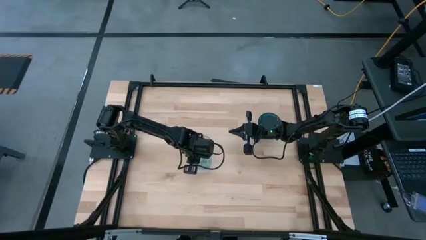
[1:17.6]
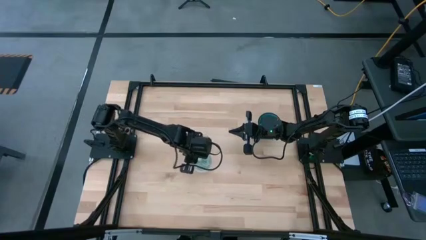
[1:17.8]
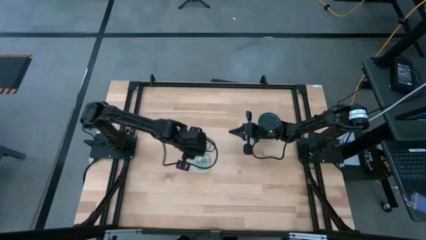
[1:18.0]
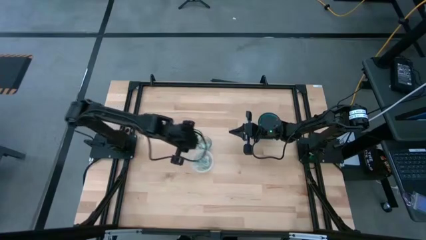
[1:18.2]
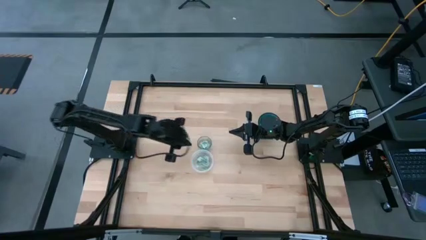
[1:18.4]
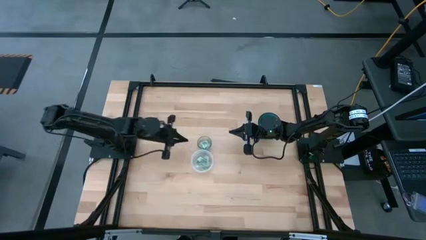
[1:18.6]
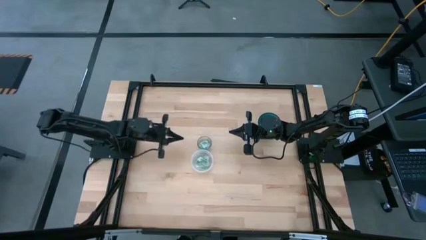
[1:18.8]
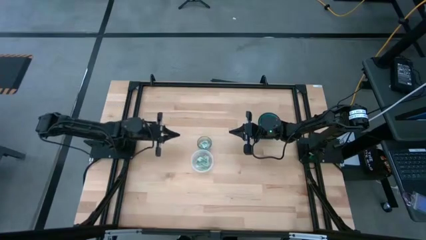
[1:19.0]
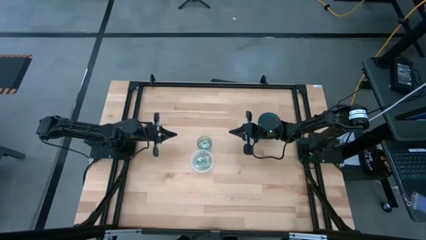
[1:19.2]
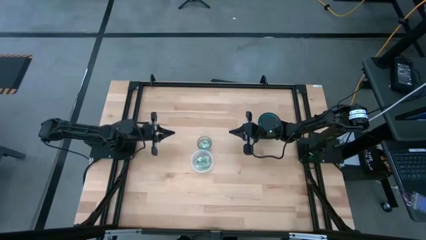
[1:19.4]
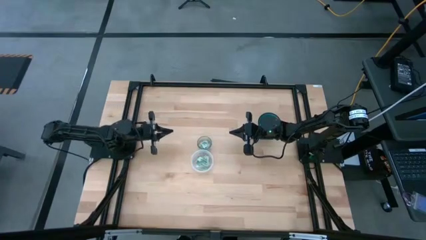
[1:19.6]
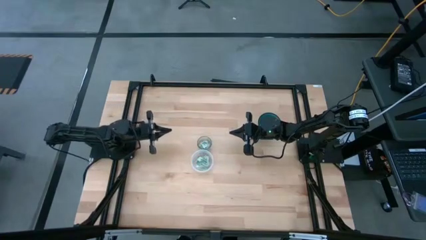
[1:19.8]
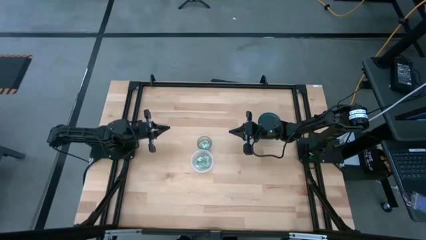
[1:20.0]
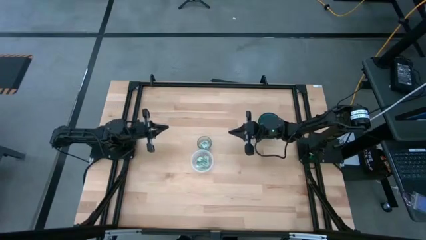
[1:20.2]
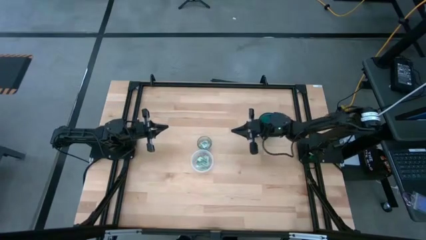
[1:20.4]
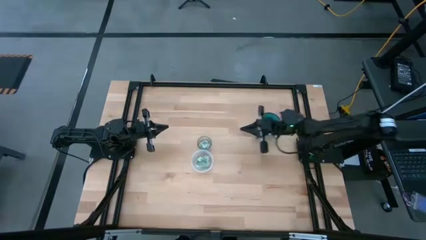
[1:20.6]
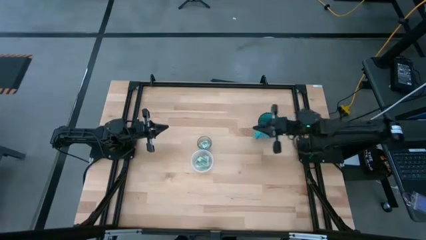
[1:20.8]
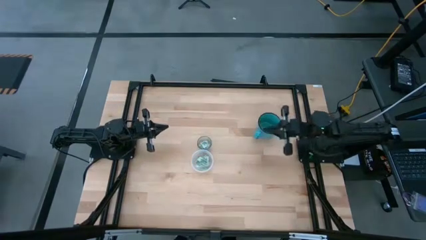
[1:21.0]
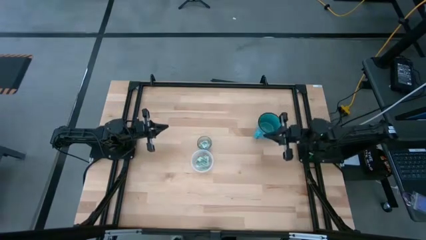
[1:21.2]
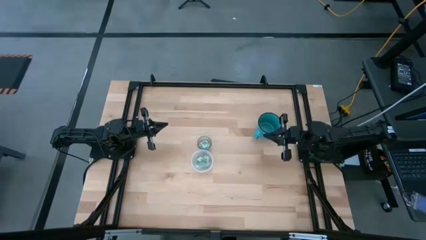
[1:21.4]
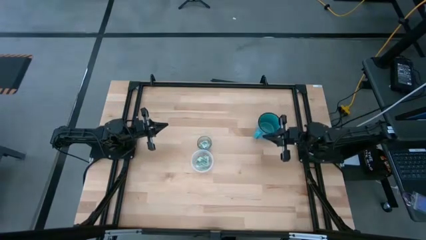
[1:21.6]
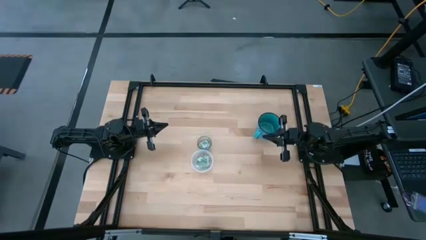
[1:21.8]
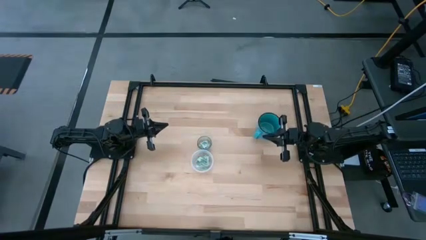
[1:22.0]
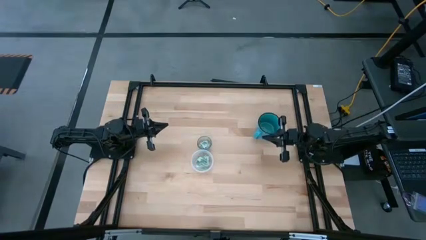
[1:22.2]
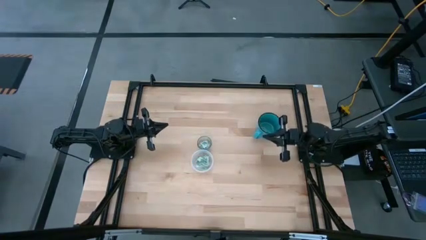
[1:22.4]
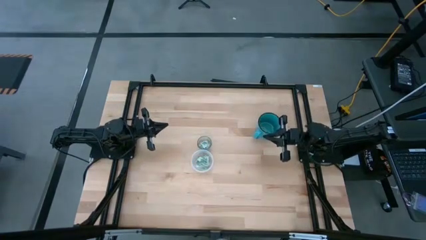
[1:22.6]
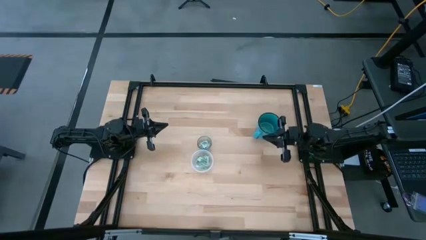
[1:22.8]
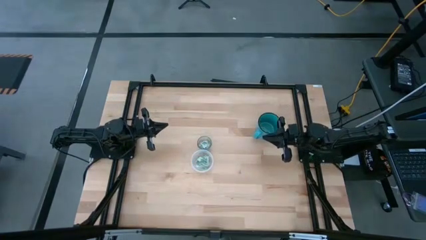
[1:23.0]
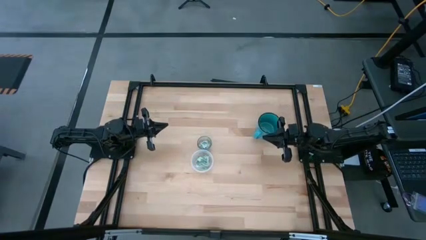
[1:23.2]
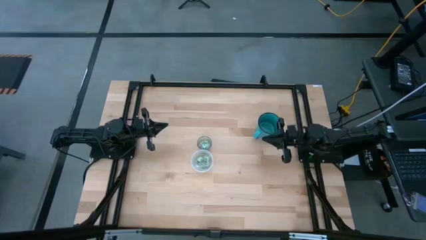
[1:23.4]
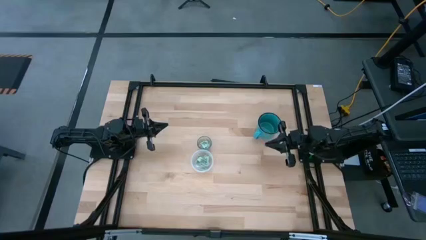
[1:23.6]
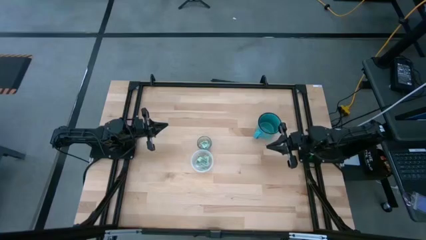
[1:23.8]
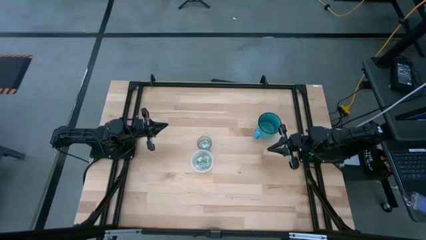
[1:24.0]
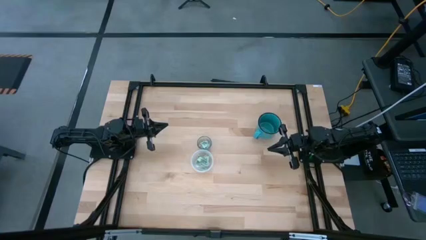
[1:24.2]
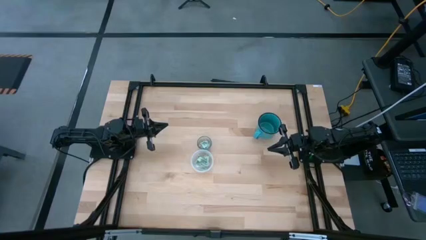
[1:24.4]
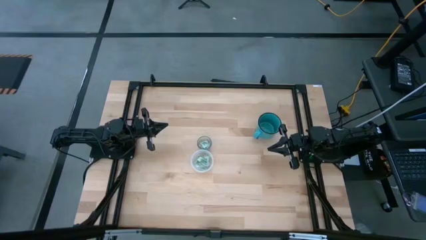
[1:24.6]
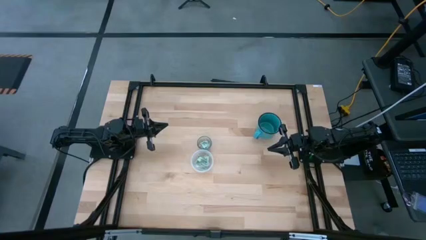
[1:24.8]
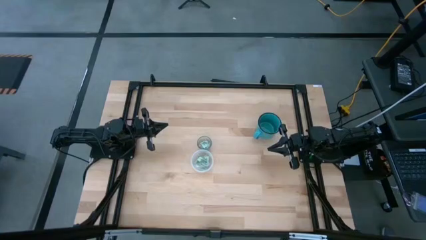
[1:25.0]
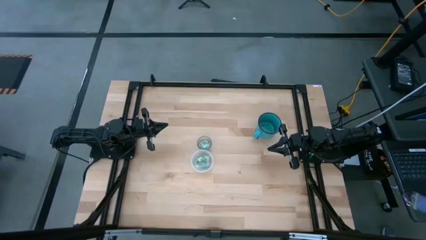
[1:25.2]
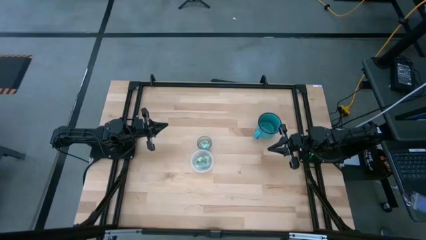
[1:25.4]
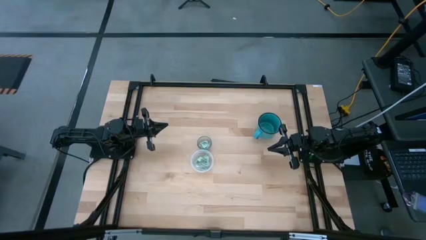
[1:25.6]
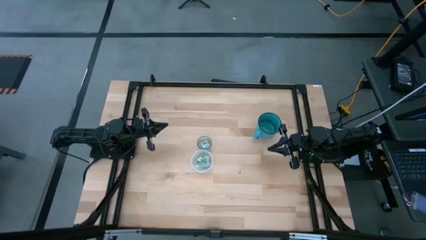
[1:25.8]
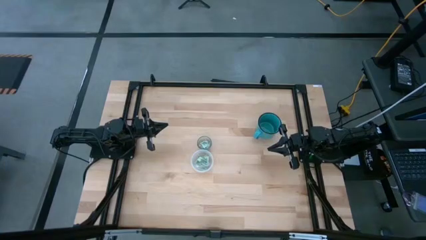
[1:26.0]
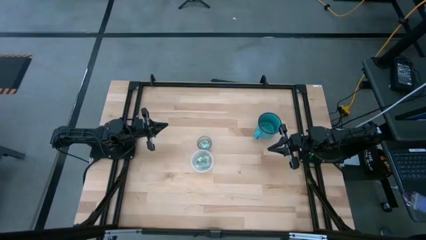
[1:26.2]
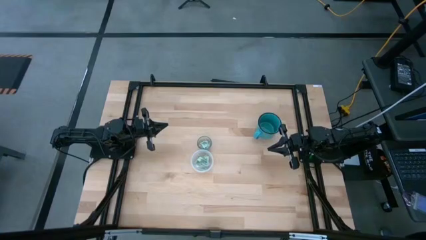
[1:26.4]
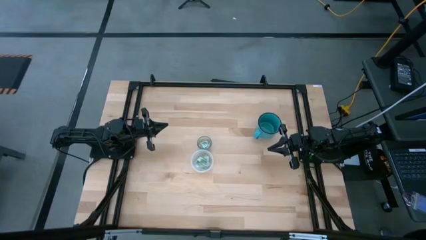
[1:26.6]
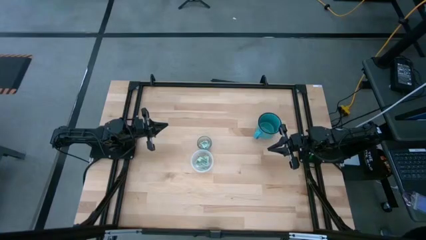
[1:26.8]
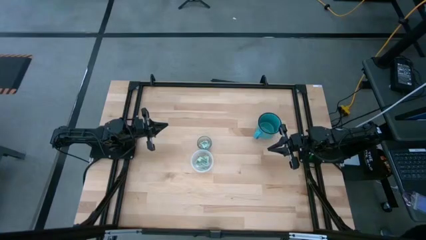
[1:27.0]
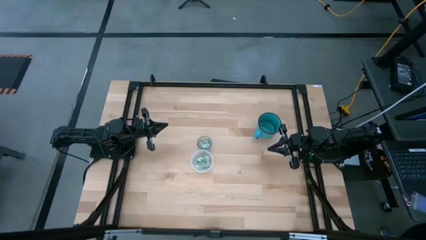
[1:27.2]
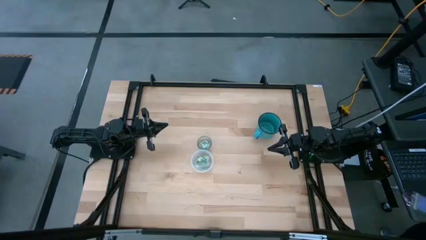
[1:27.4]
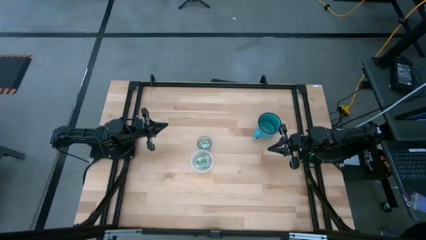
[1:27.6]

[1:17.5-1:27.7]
Task: Pick and place items into bin
Return to Home Position
